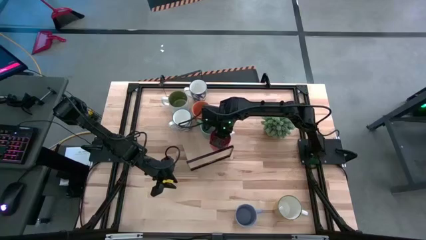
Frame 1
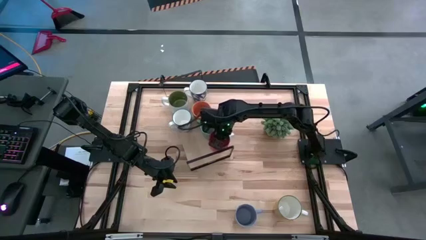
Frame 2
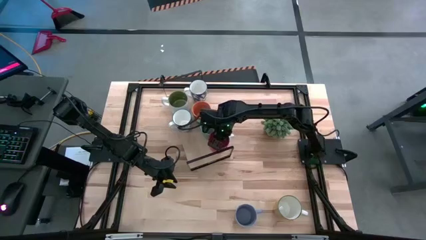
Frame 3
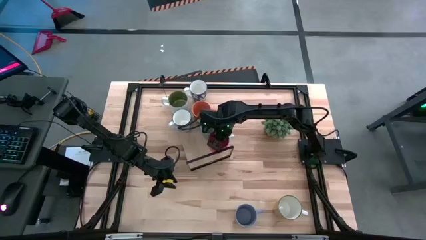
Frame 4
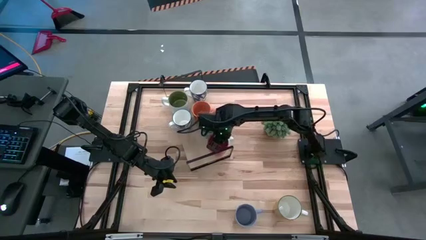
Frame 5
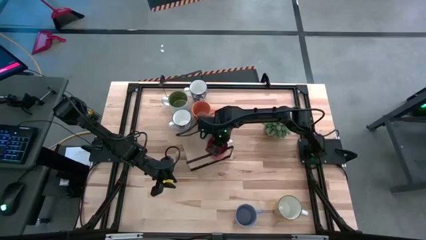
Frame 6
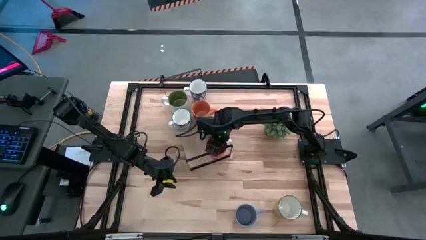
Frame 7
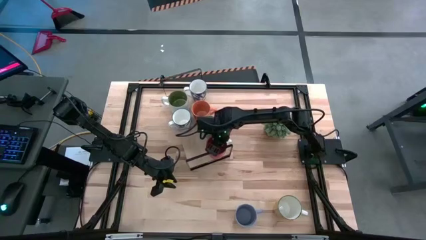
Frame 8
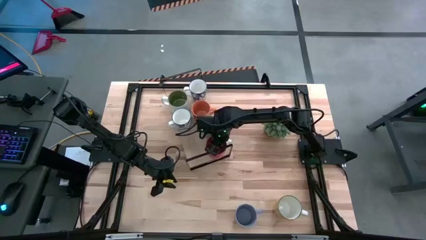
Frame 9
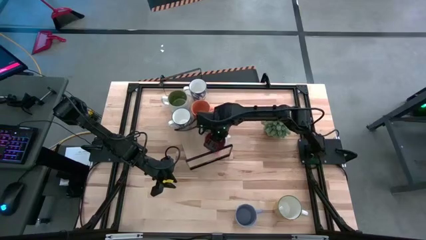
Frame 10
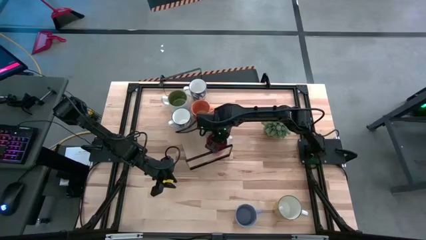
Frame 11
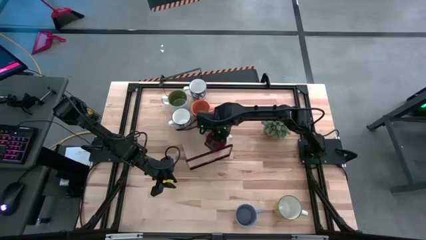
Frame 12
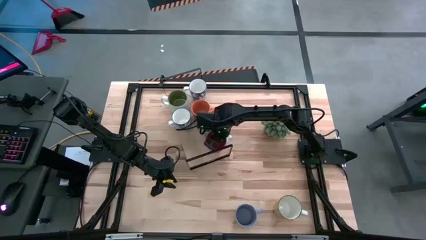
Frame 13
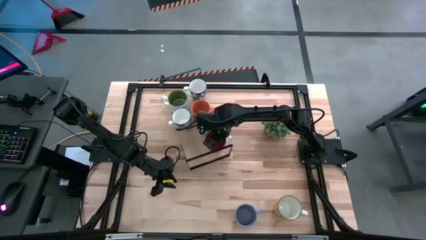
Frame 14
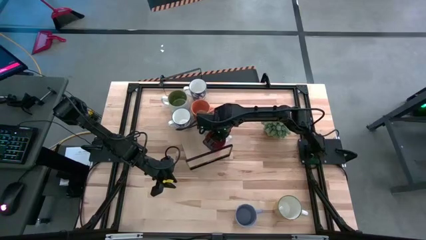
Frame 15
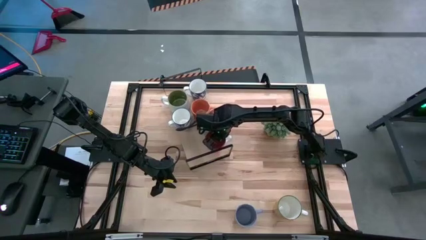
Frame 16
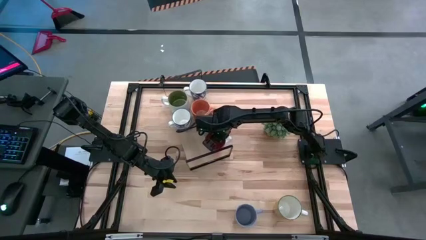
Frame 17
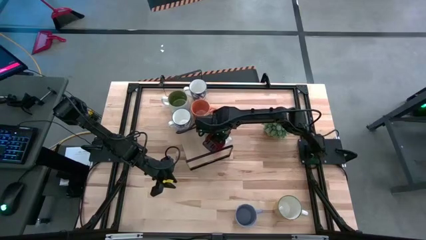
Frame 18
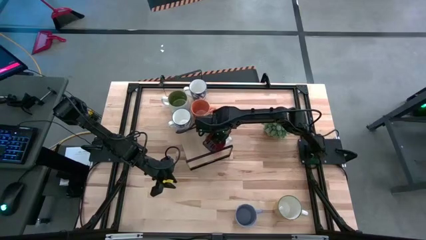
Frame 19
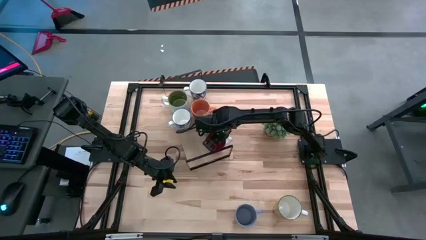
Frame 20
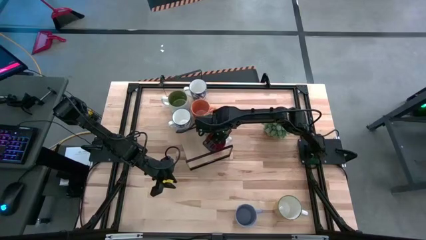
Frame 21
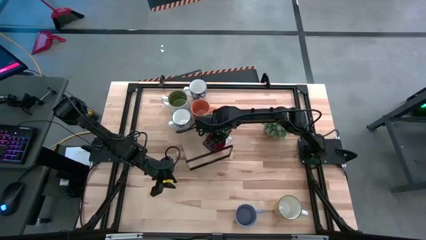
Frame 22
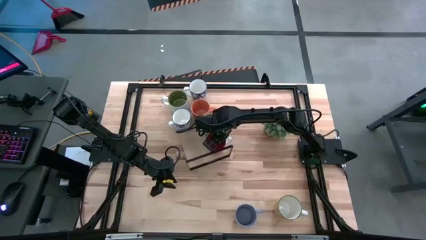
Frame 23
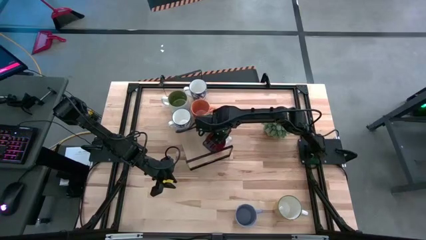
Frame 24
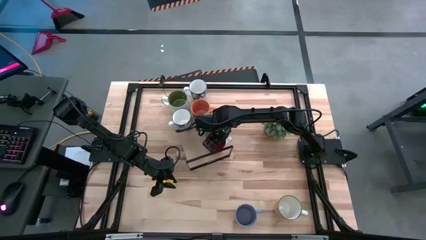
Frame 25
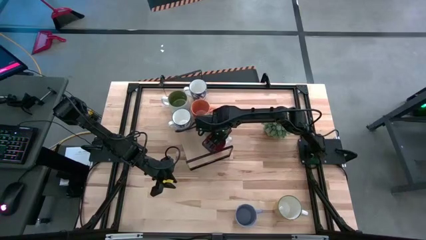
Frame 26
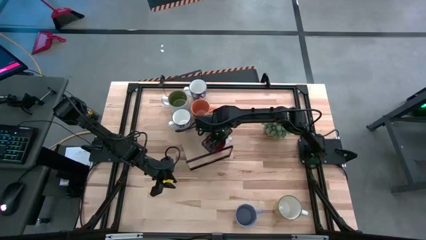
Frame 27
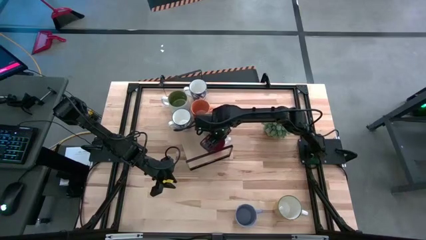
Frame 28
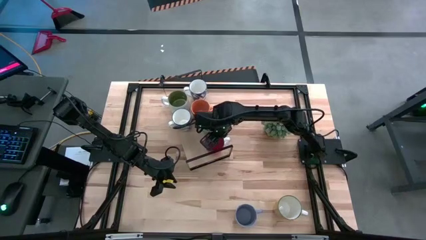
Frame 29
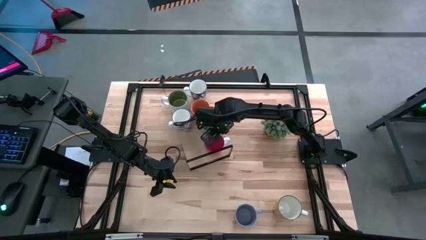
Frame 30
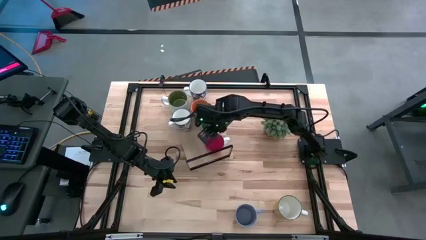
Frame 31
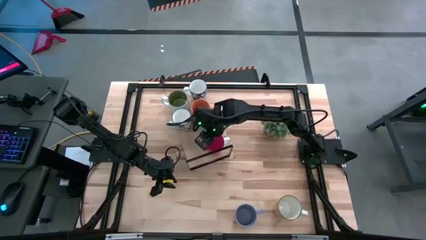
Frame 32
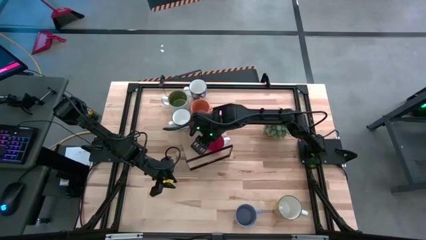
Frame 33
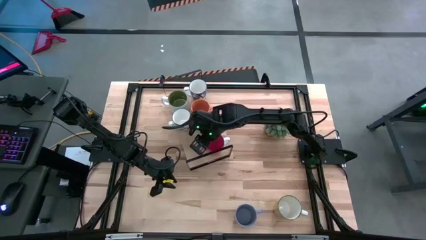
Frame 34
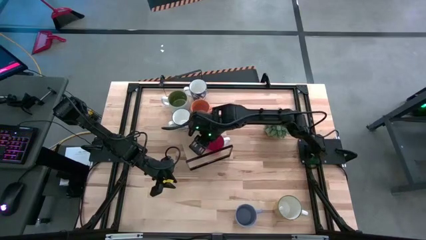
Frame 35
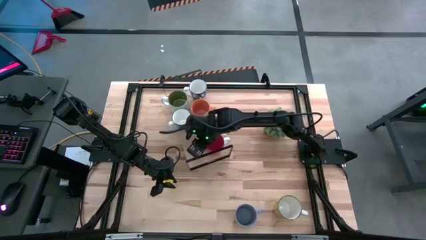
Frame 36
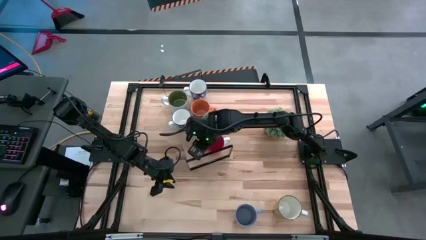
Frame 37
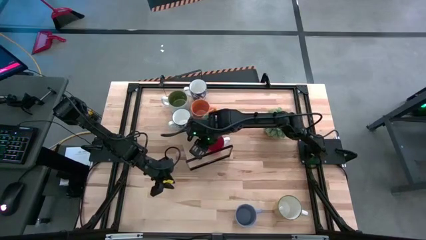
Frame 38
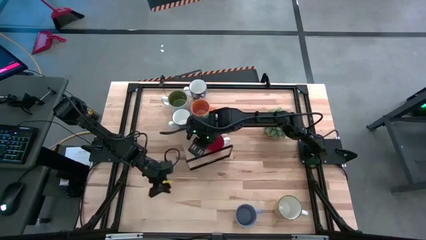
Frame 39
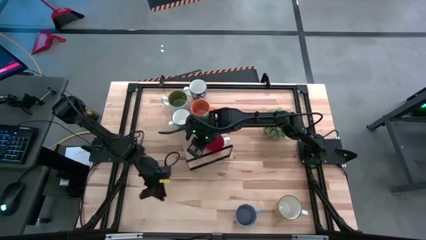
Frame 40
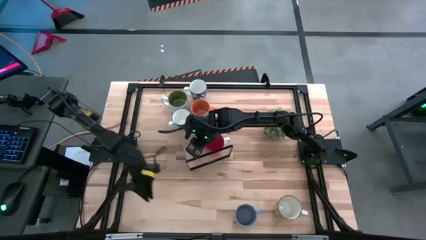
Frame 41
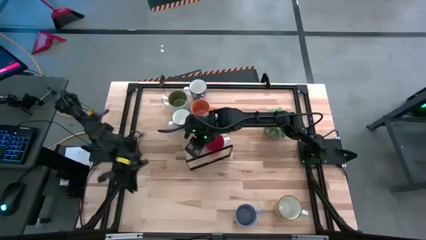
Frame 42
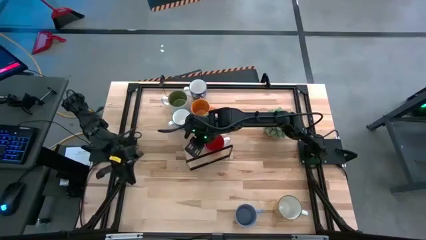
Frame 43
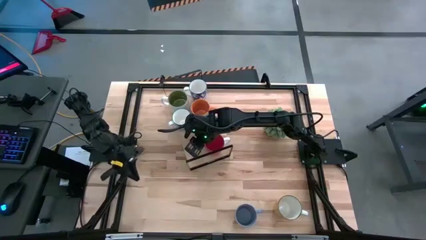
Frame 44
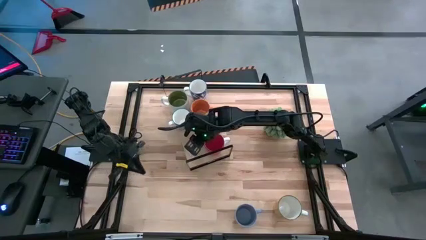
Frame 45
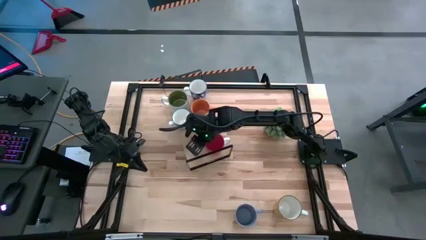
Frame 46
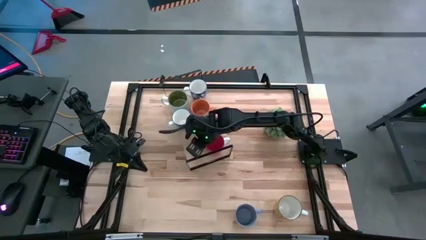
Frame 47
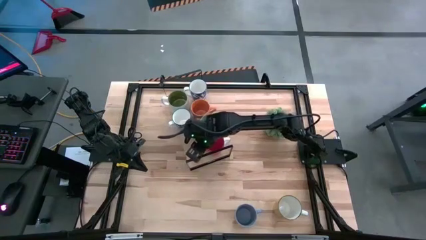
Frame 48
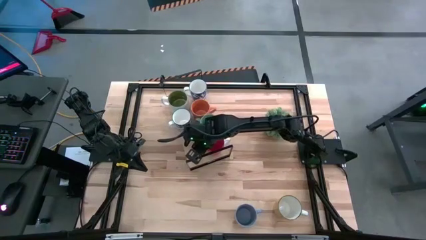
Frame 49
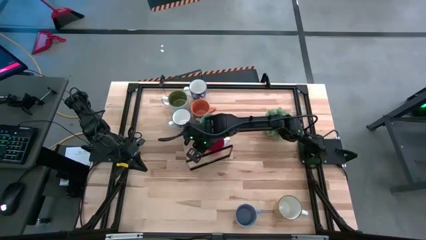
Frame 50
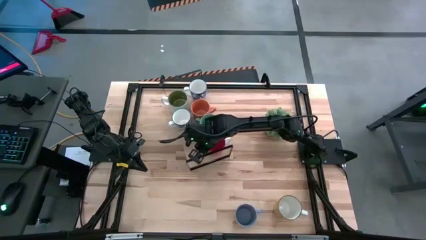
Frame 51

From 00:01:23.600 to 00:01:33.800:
Task: Place coffee mugs
Put the red mug on the shelf
